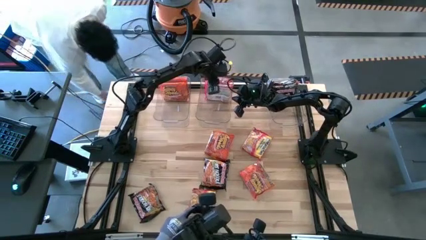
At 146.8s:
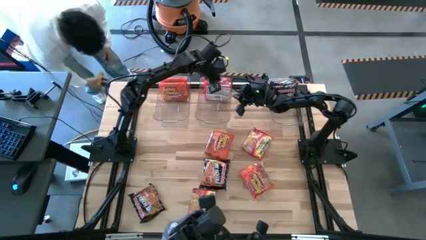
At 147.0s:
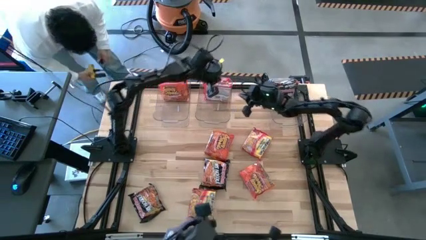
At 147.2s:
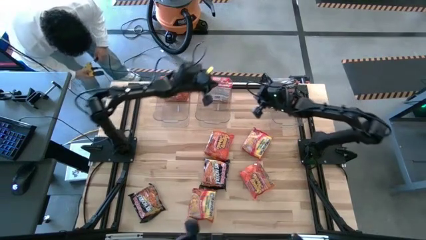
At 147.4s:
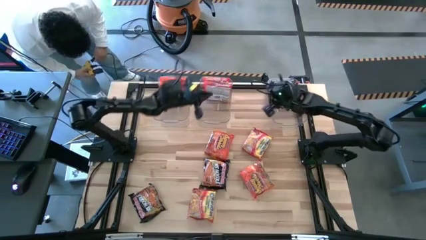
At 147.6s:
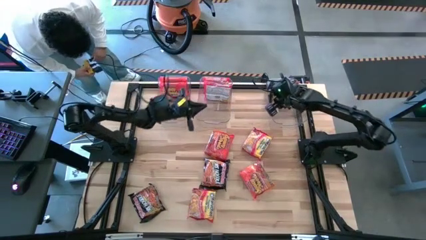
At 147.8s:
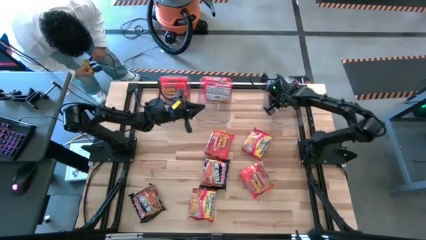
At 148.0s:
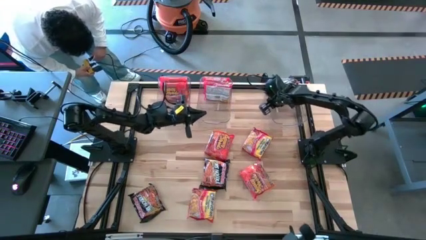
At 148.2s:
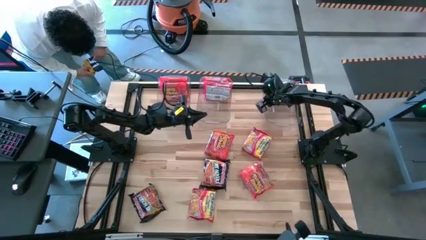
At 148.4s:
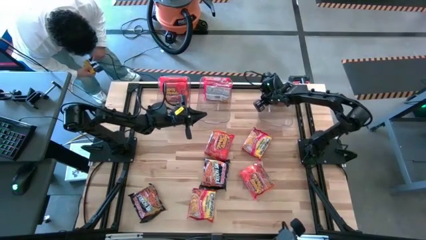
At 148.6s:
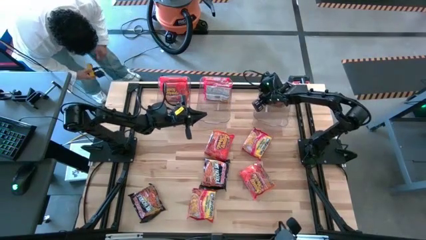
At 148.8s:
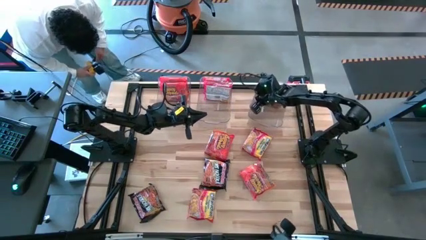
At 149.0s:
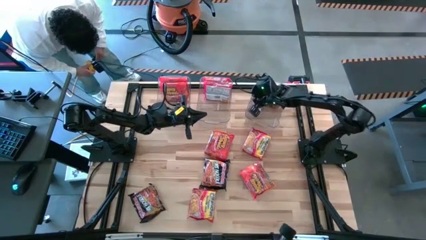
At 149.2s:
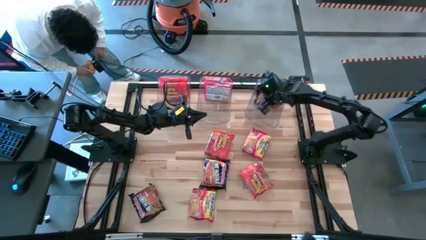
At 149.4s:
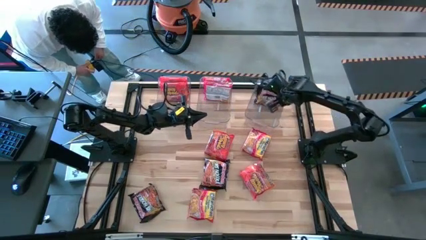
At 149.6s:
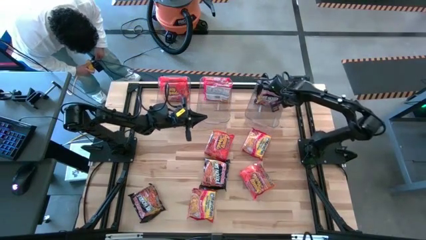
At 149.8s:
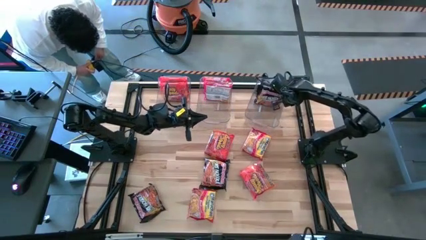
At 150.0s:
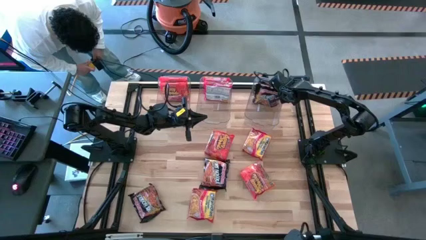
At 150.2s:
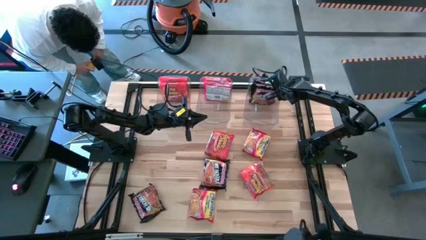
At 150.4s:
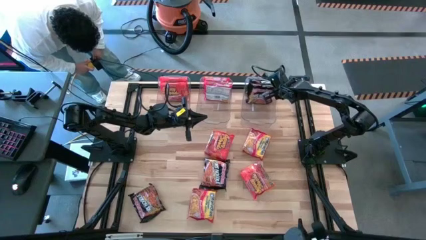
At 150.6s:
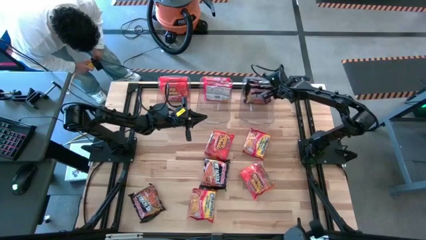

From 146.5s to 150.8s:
Task: Sort Maruchan noodles
Adjust the right transparent bin on the table

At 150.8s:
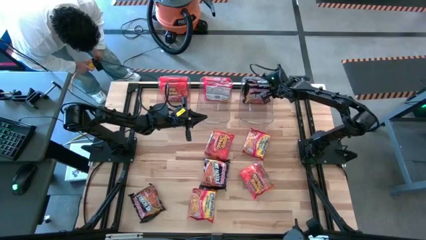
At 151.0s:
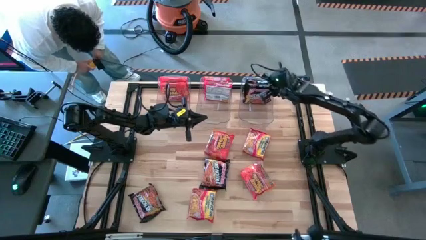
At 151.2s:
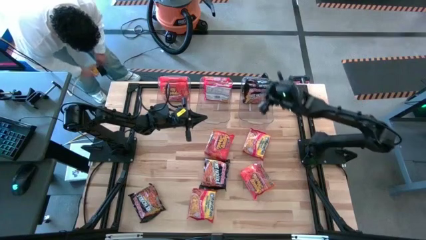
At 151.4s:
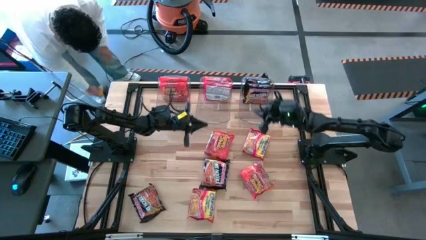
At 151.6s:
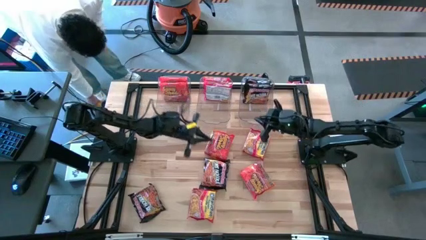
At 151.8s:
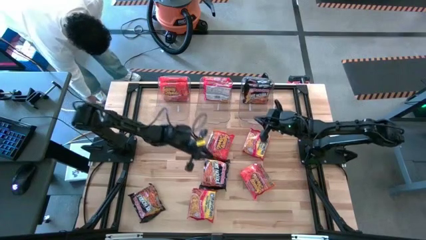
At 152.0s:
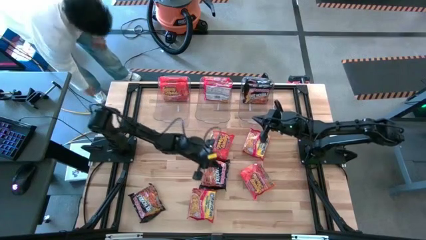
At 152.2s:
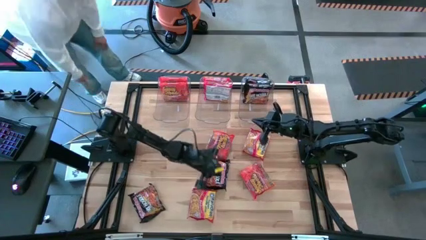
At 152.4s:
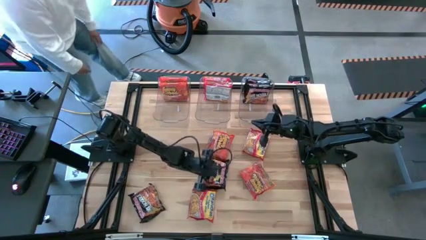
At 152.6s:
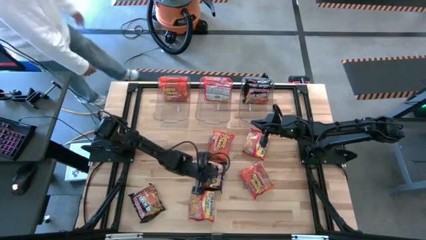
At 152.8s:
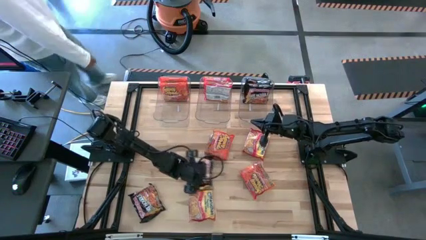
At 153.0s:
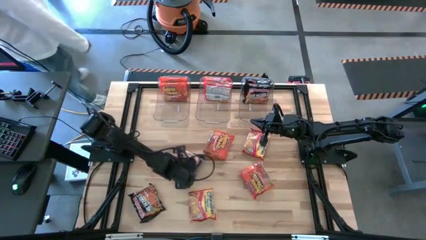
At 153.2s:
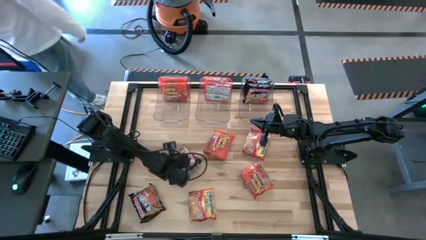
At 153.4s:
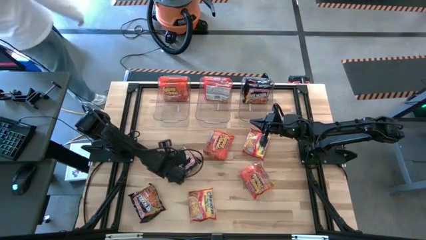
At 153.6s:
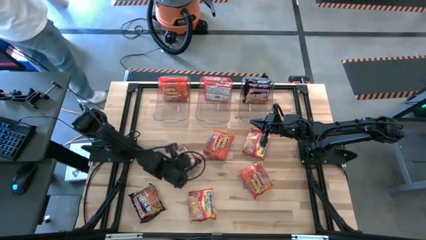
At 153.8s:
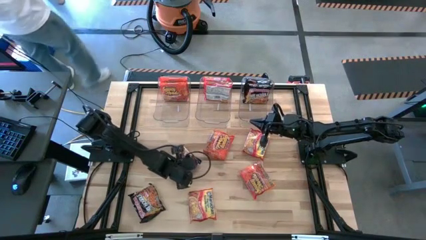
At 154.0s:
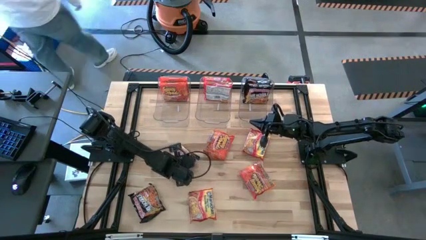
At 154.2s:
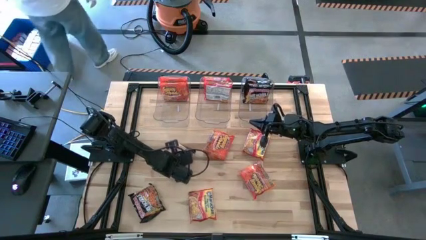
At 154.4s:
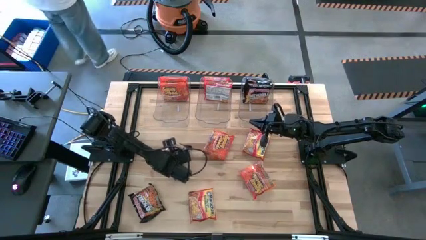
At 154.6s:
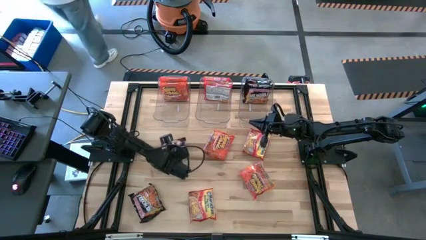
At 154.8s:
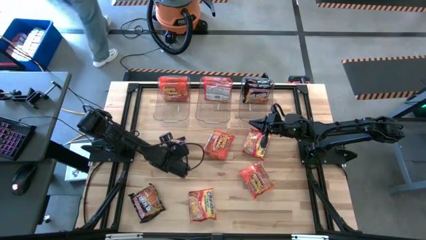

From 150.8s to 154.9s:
Move the black noodle pack to the top left of the table

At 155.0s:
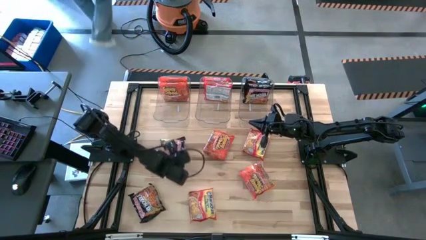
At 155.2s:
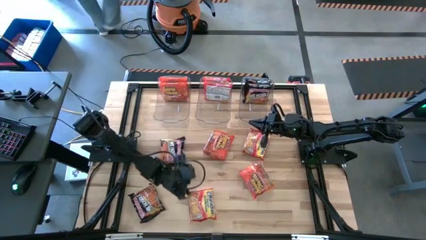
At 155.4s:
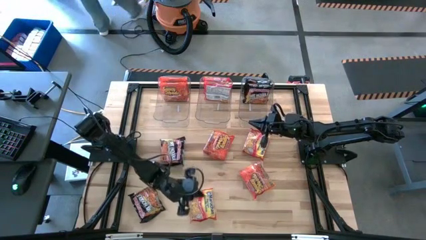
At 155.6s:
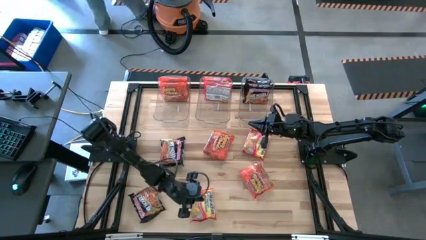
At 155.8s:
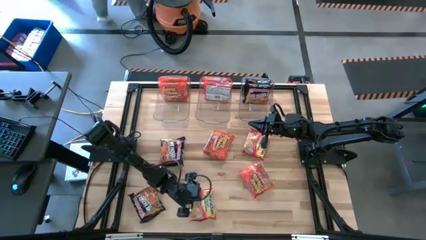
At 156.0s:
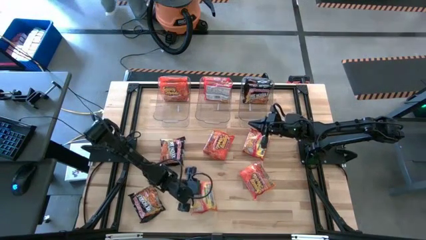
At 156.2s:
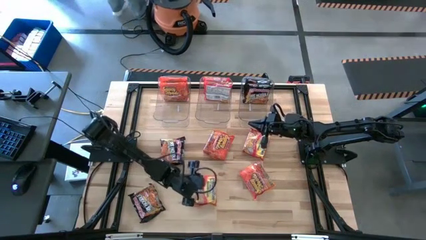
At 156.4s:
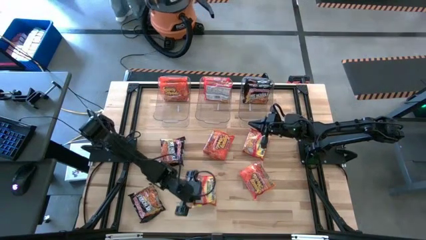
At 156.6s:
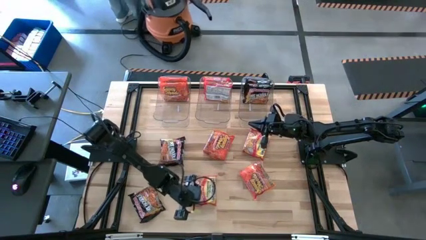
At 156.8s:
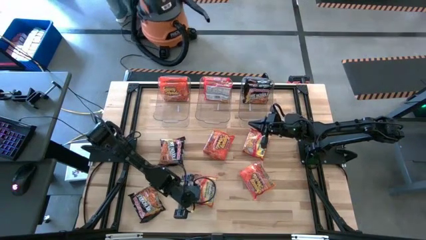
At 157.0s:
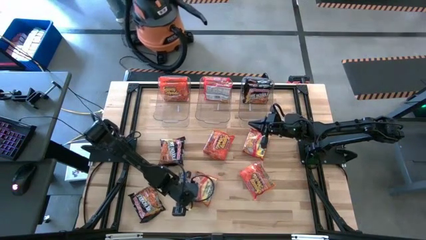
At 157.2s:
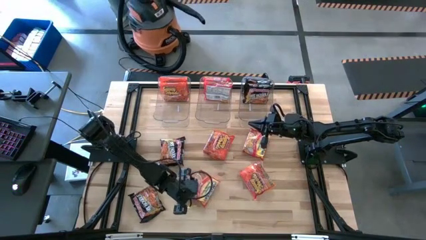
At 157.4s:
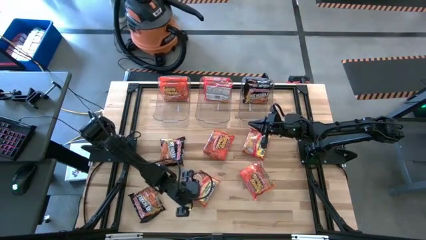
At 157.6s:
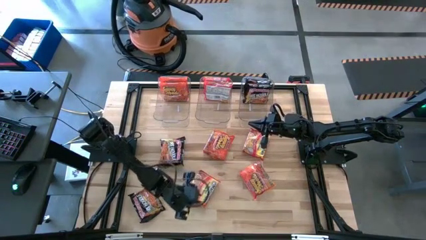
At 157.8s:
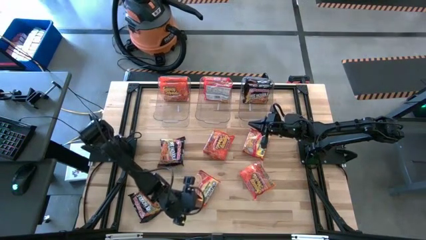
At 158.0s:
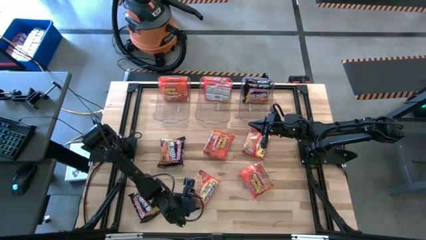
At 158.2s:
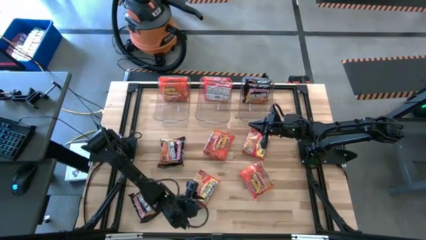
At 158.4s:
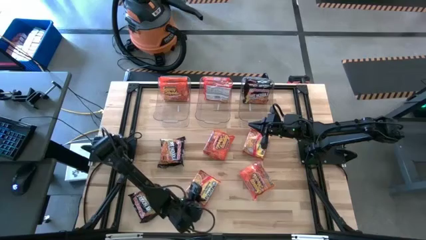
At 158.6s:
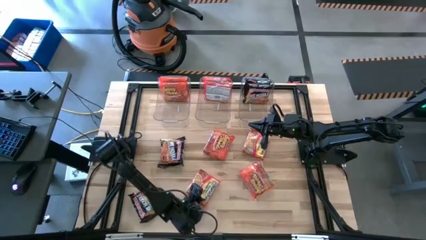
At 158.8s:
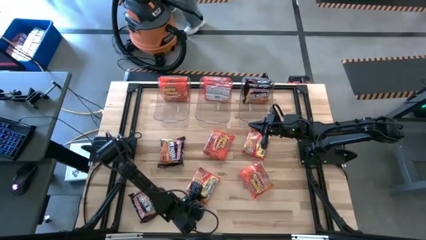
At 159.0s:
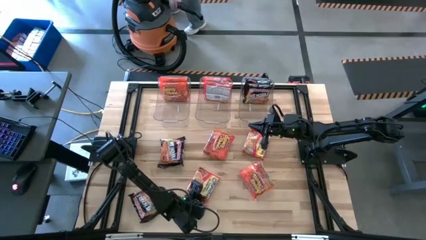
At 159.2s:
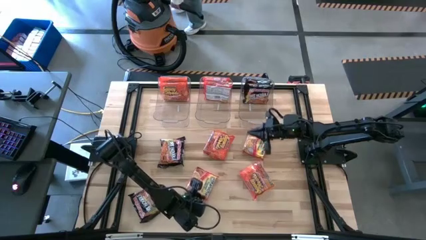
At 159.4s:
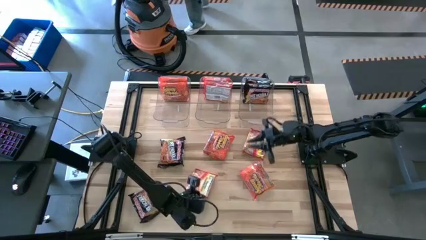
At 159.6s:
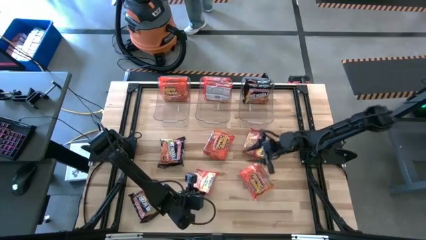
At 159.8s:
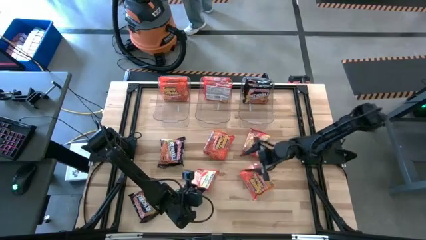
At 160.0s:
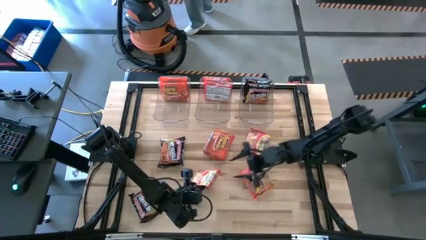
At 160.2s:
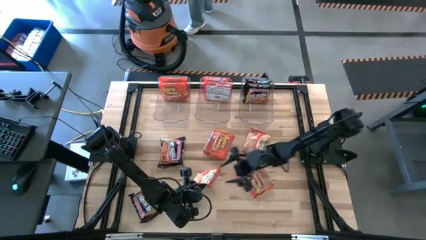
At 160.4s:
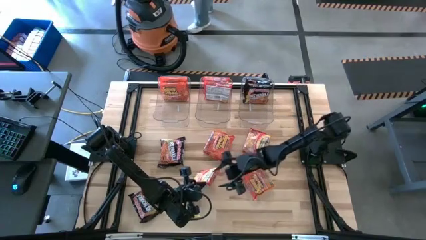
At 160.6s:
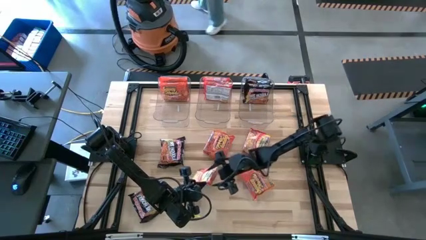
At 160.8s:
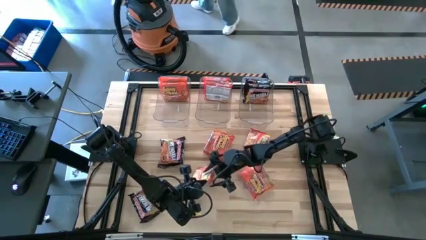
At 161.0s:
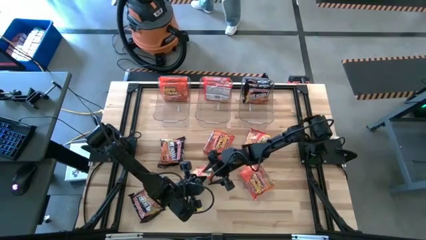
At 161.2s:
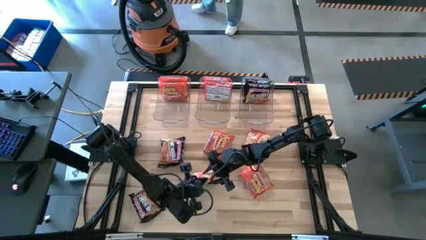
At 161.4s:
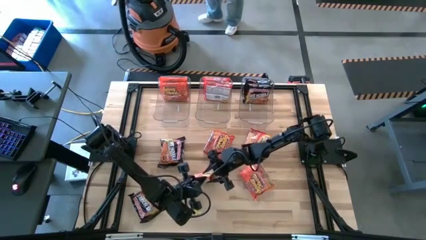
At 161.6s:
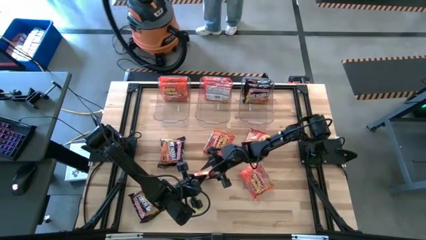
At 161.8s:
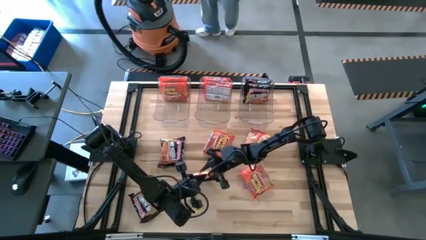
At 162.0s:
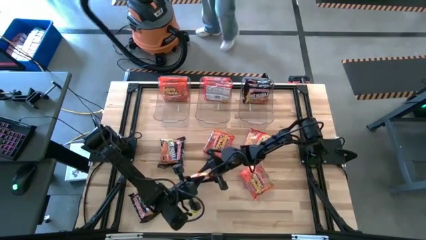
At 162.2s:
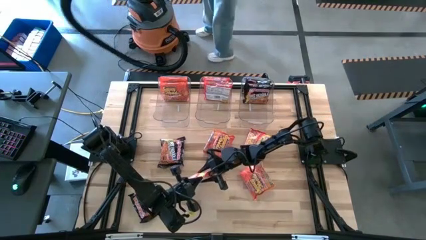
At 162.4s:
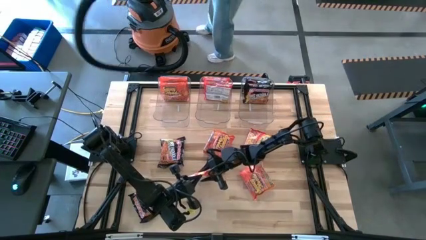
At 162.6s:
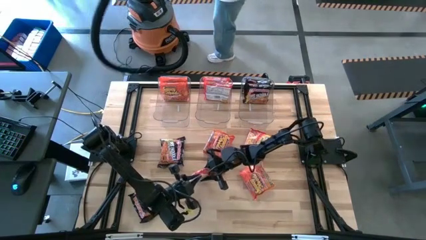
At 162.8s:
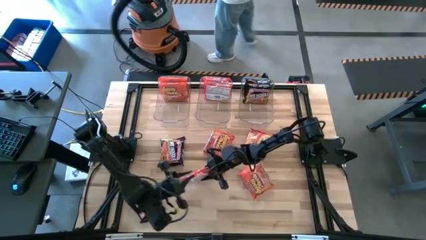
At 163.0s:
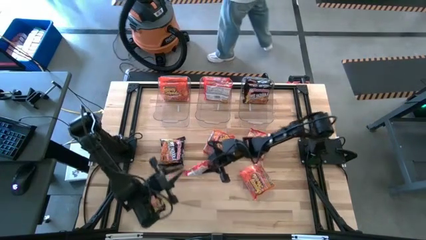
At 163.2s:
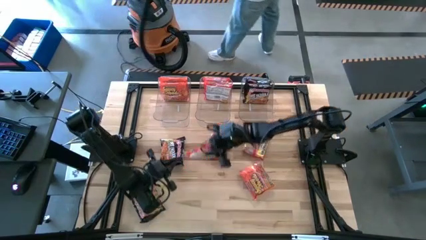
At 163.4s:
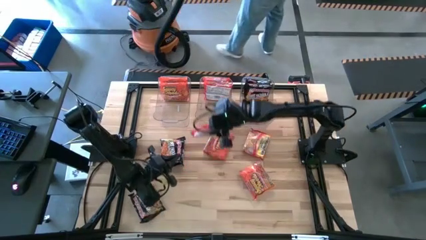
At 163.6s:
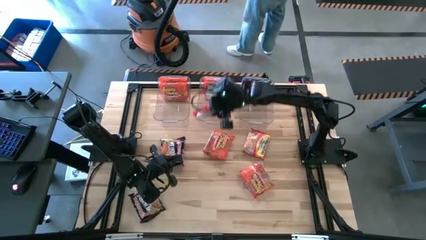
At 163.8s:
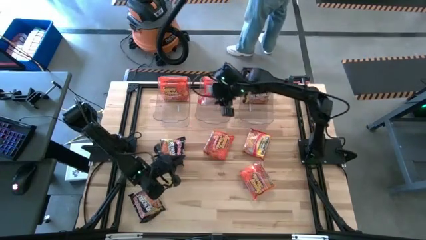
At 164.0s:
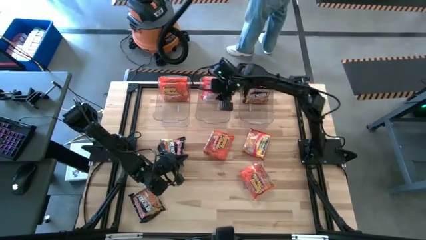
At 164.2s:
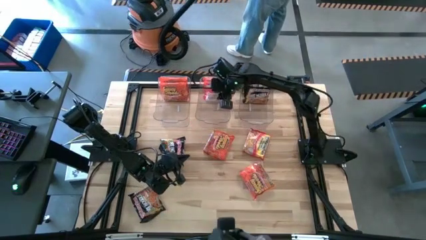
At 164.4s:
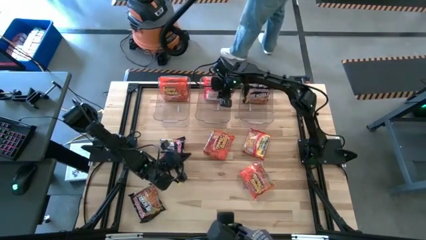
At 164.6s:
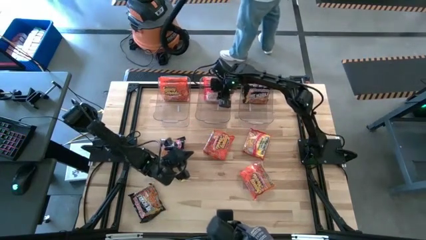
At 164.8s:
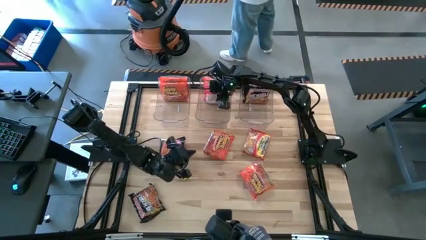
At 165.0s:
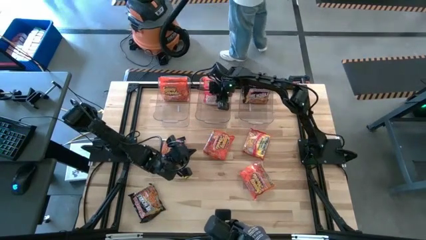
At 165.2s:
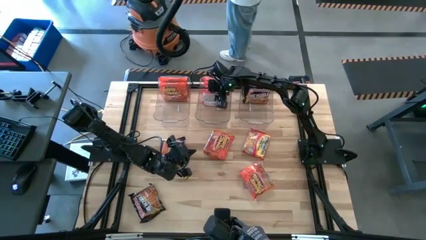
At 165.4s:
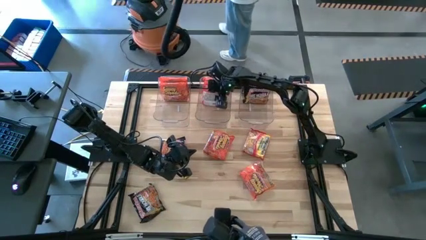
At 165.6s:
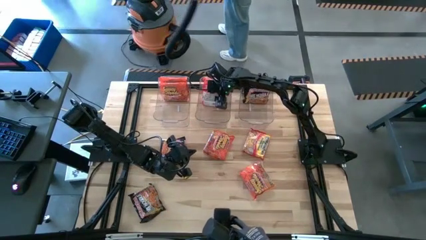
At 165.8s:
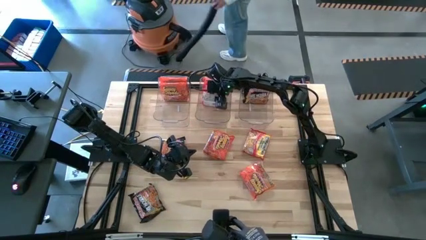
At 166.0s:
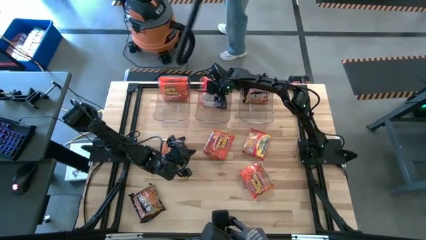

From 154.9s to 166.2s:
Put the red noodle pack into the middle transparent bin
